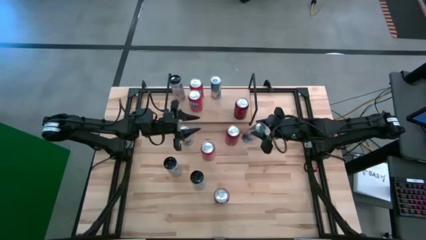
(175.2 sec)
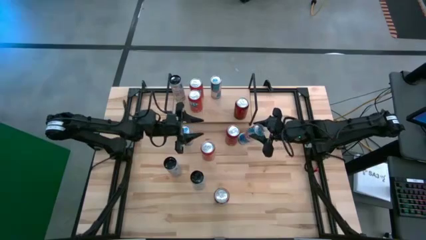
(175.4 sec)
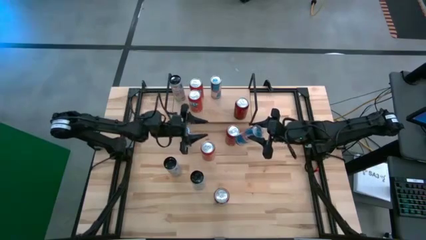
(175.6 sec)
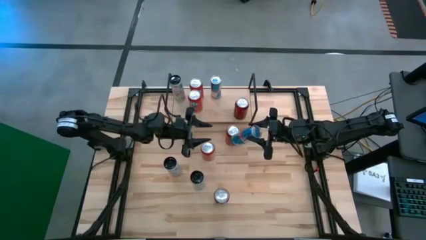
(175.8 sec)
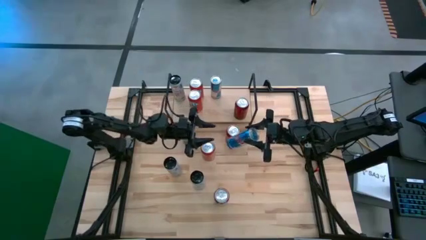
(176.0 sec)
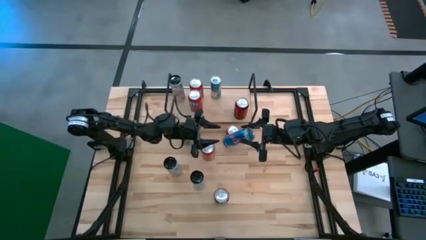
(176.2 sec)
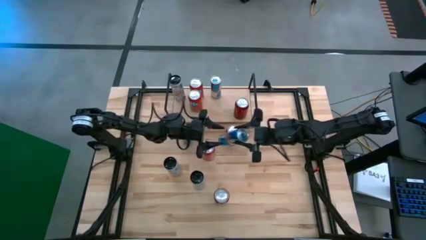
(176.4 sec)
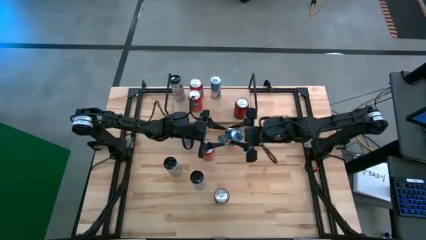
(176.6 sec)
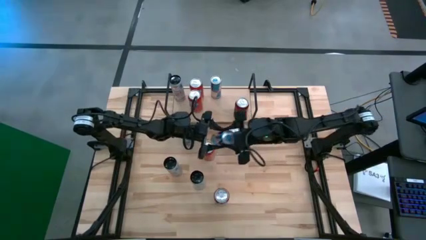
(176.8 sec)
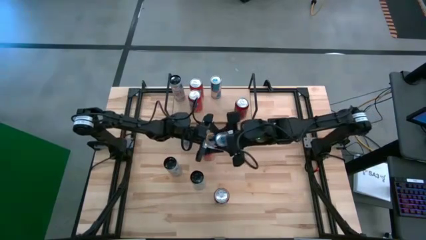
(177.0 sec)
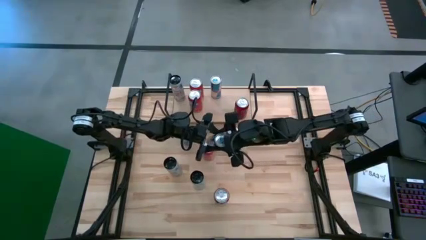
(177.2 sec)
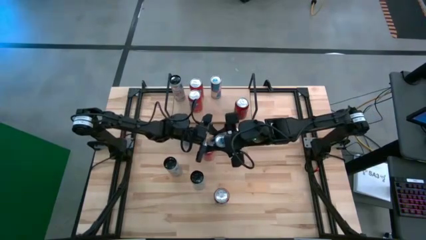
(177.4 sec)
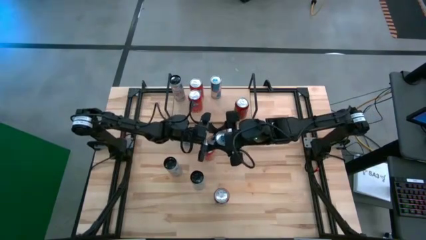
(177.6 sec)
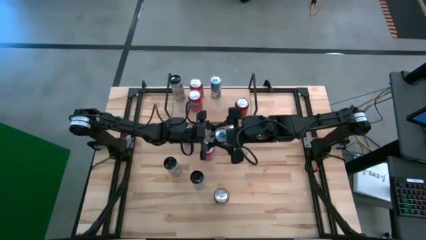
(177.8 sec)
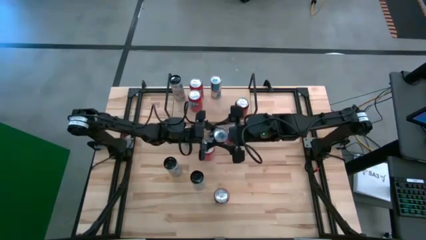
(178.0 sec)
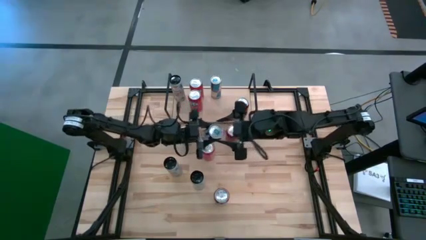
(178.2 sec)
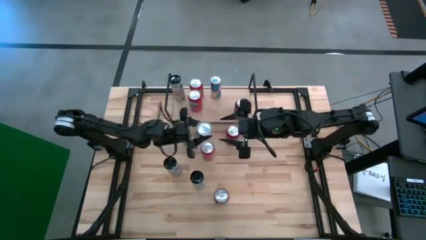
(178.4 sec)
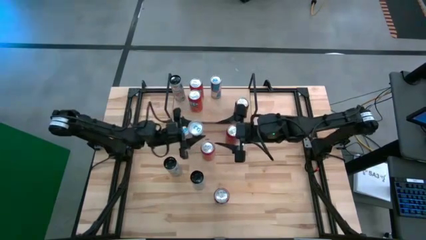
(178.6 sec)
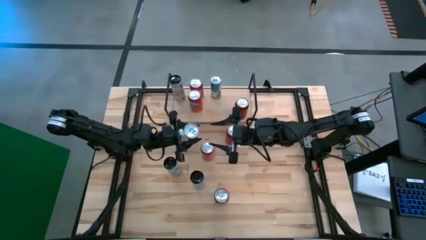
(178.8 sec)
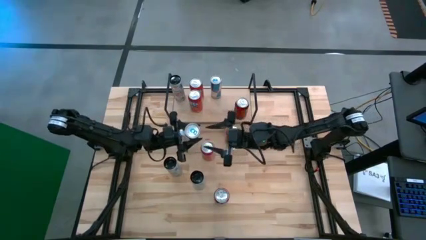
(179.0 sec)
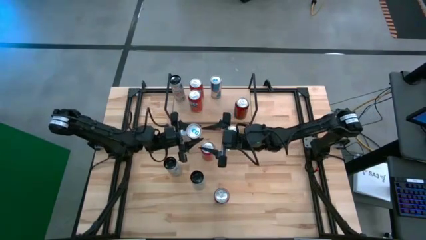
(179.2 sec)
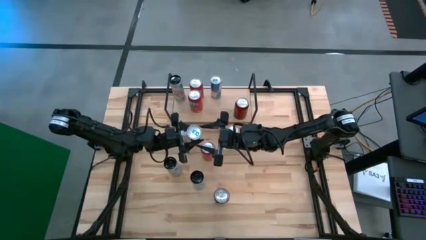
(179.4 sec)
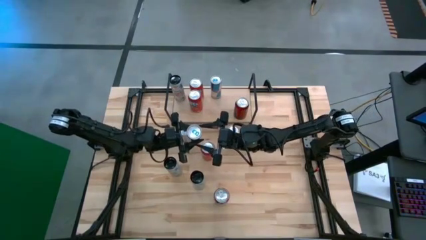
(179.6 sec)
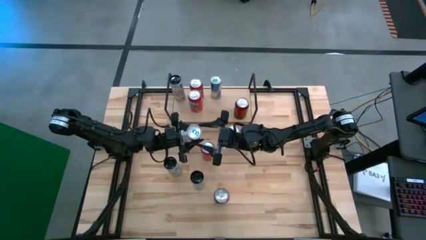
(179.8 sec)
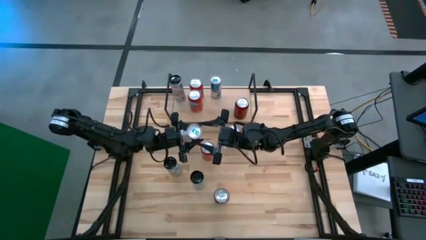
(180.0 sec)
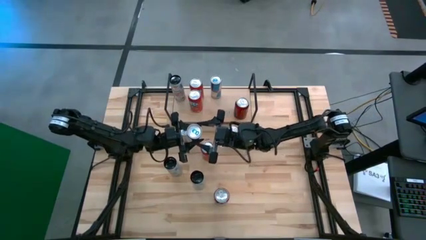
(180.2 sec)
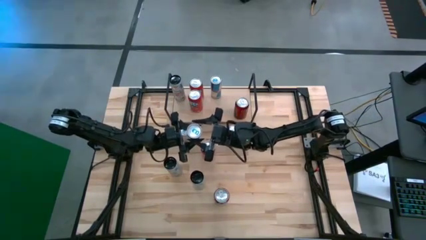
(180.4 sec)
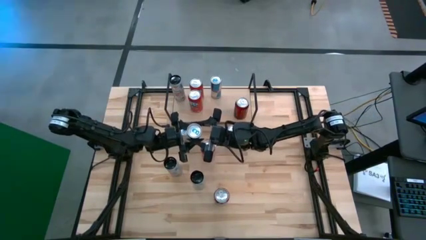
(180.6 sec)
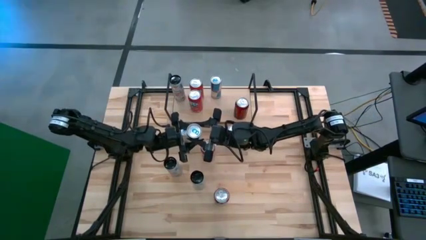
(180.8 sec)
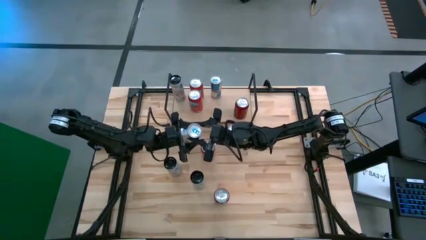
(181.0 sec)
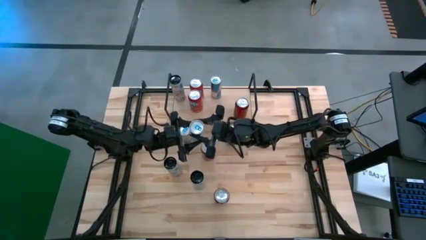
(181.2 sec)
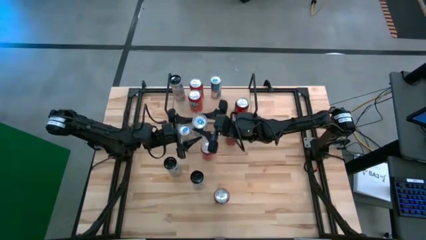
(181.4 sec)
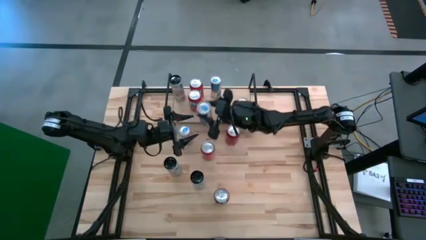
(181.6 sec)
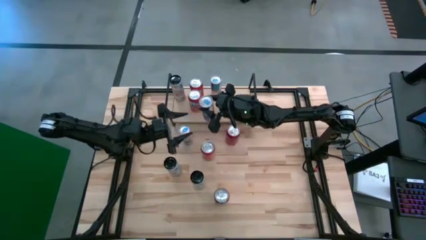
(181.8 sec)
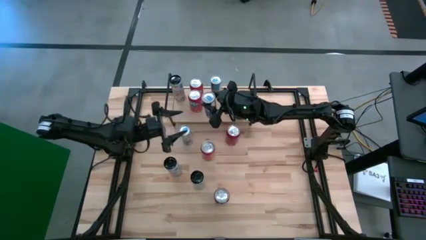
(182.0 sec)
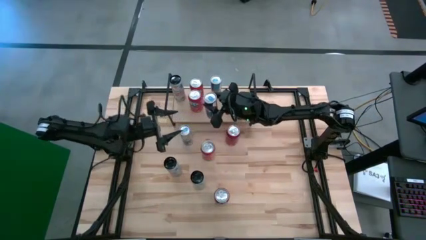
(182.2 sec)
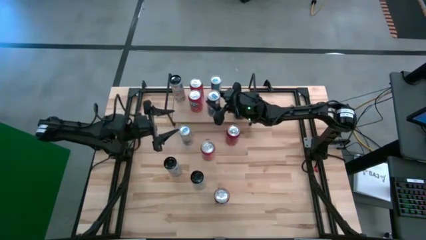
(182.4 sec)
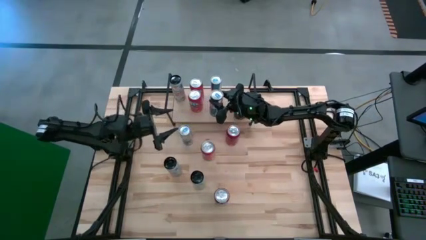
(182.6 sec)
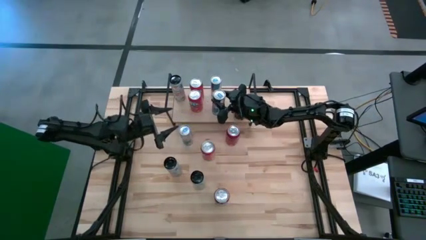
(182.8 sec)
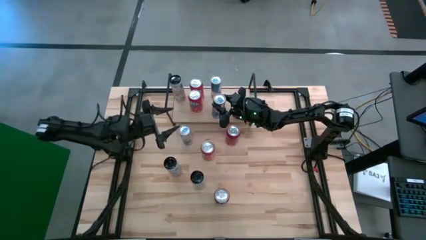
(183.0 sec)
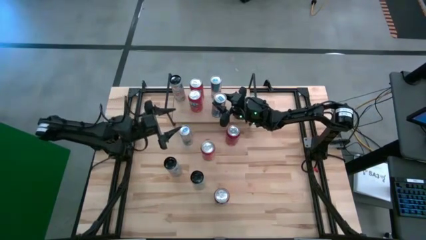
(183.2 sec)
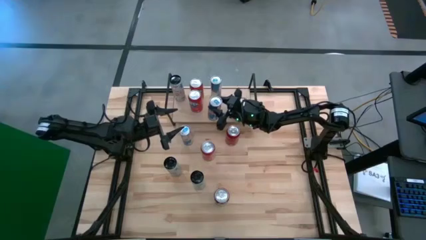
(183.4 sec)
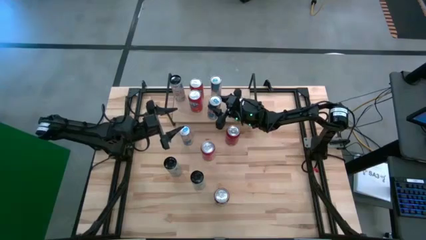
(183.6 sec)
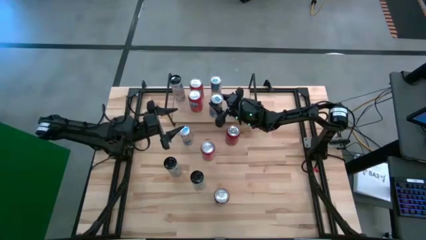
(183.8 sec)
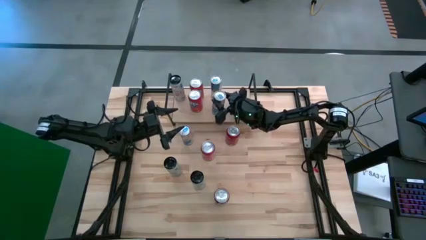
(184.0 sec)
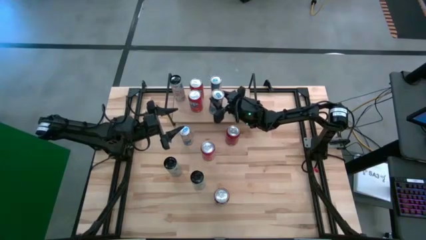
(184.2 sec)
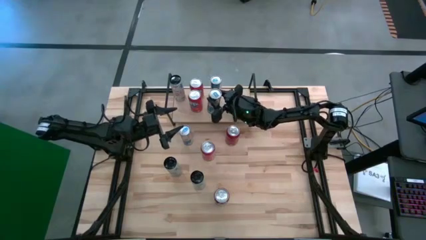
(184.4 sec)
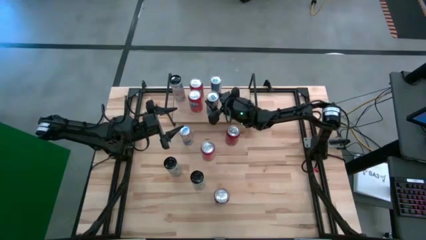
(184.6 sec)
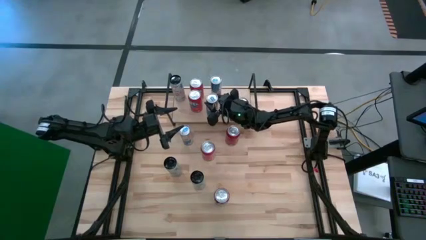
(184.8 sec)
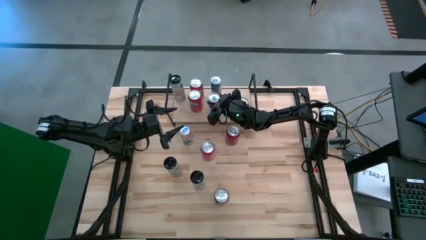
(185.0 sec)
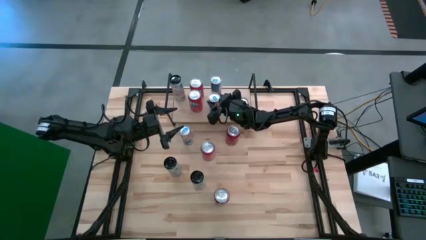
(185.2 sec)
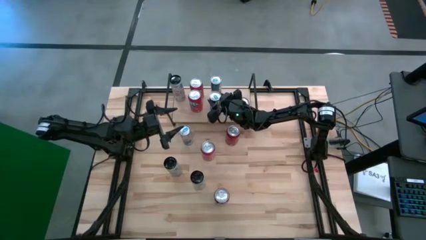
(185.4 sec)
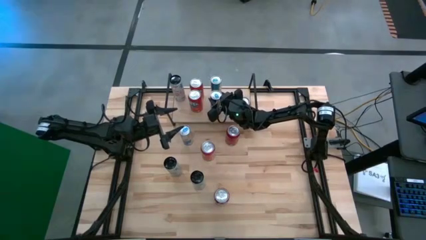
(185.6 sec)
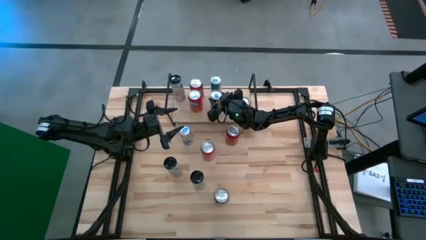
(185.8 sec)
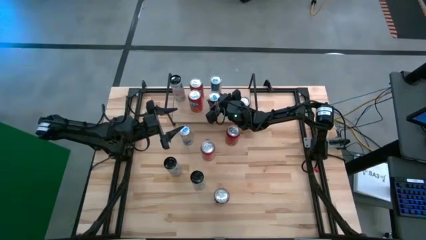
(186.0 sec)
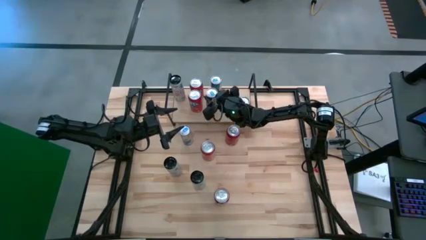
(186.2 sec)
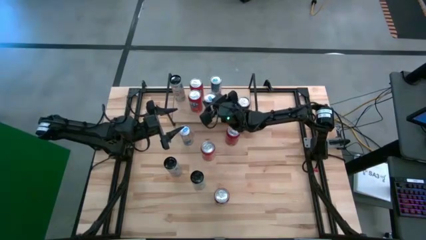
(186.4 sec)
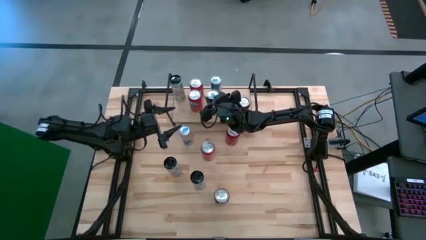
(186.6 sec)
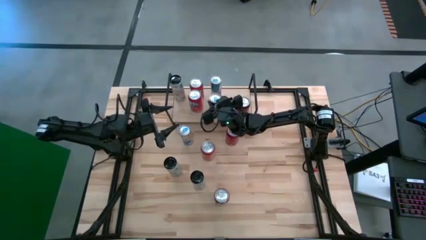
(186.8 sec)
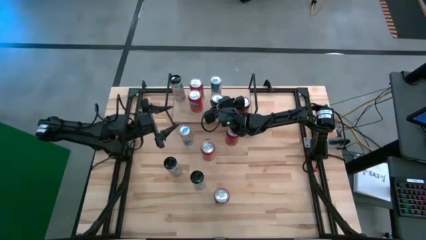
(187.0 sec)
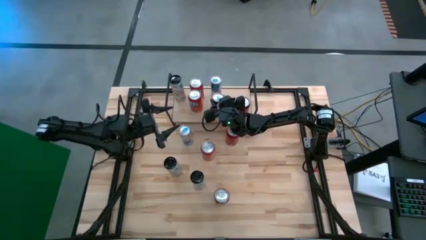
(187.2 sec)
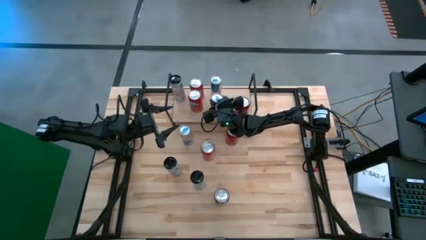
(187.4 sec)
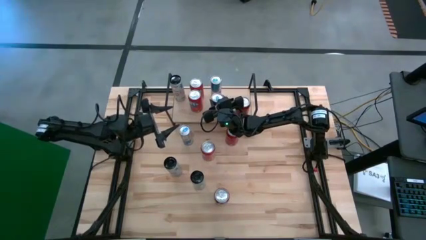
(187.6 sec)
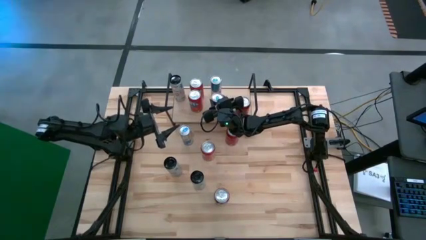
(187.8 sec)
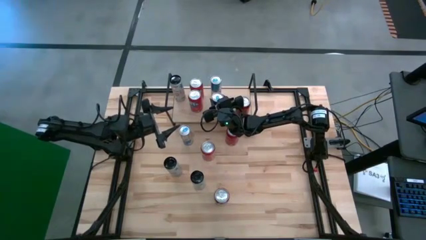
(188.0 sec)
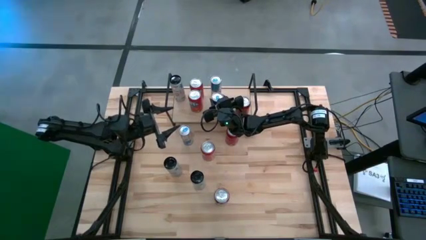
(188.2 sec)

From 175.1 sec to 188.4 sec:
Task: Place canned beverage on shelf
Put the right blue soda can on the shelf aligned with the other blue soda can
